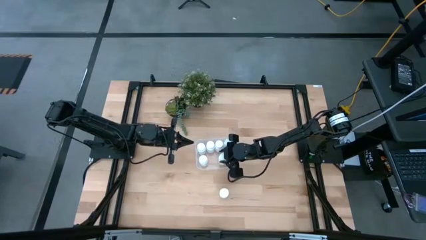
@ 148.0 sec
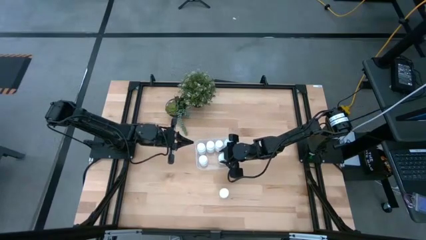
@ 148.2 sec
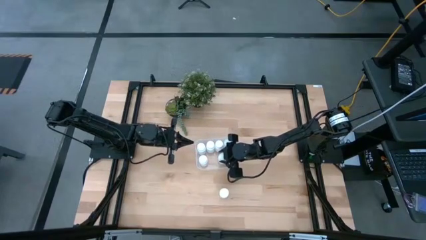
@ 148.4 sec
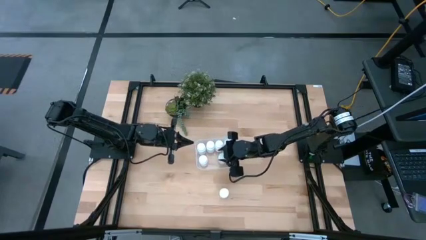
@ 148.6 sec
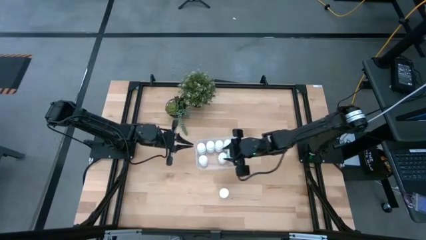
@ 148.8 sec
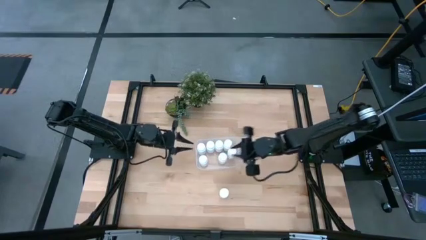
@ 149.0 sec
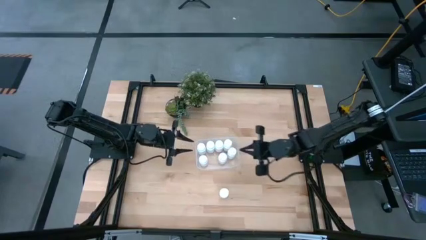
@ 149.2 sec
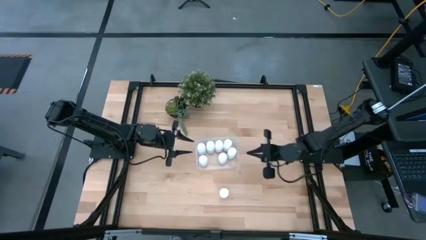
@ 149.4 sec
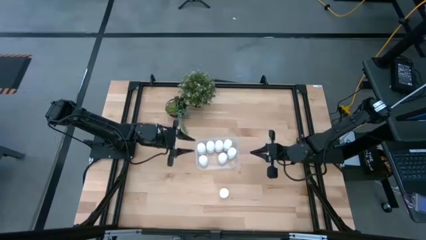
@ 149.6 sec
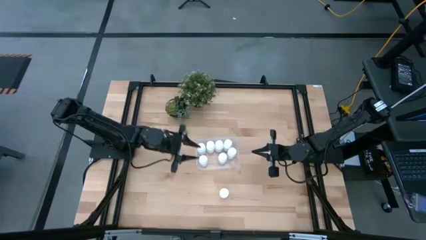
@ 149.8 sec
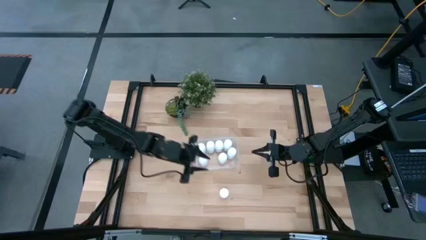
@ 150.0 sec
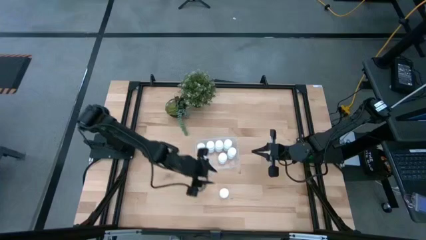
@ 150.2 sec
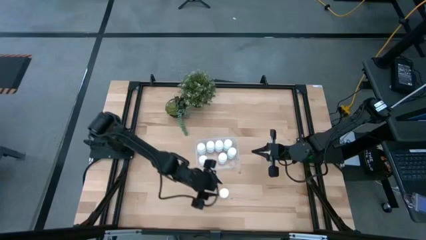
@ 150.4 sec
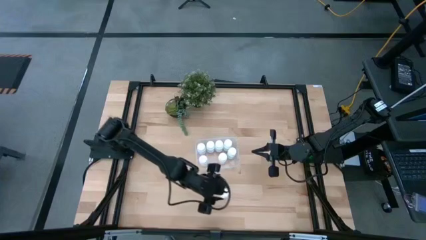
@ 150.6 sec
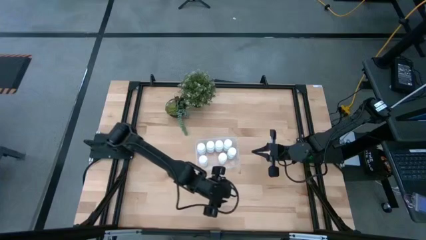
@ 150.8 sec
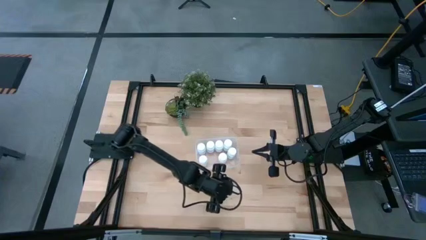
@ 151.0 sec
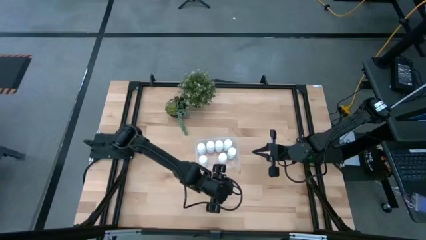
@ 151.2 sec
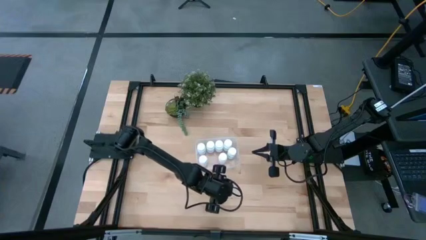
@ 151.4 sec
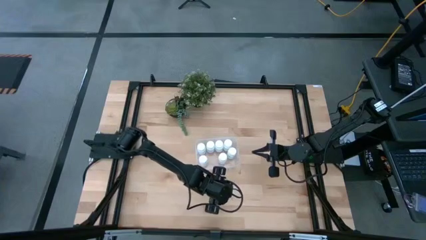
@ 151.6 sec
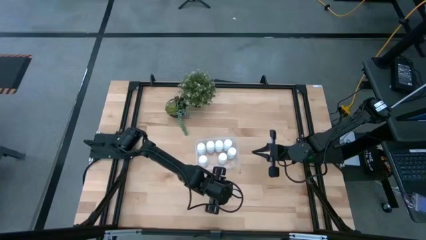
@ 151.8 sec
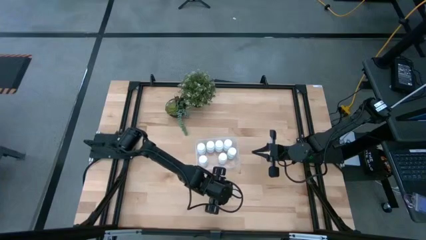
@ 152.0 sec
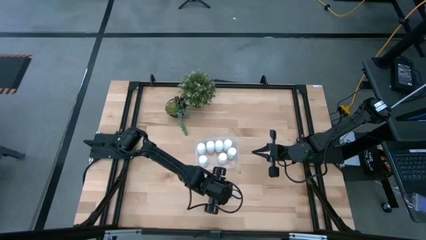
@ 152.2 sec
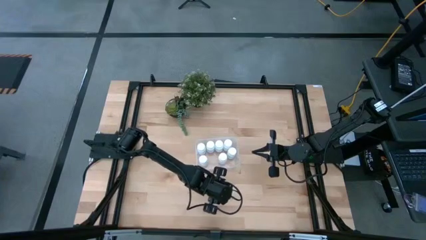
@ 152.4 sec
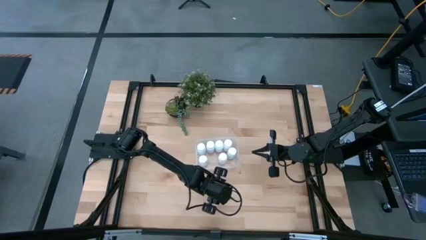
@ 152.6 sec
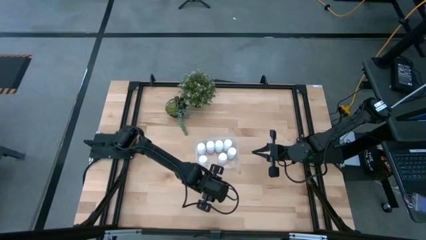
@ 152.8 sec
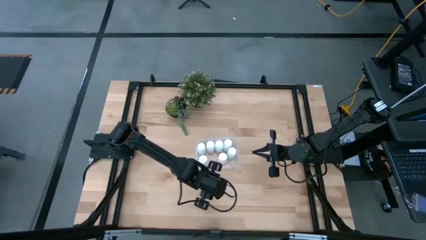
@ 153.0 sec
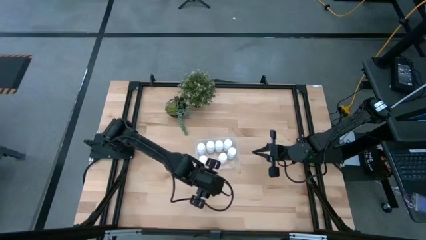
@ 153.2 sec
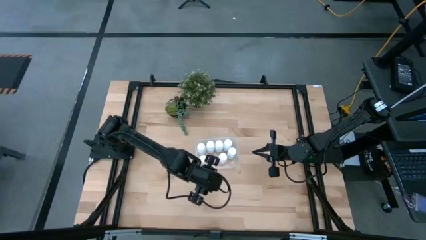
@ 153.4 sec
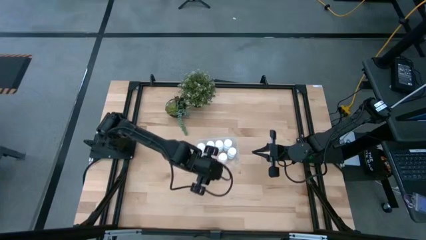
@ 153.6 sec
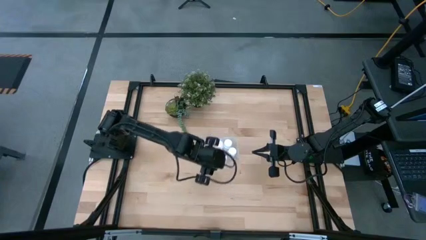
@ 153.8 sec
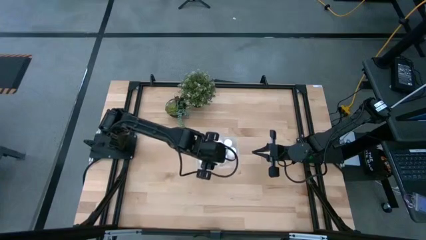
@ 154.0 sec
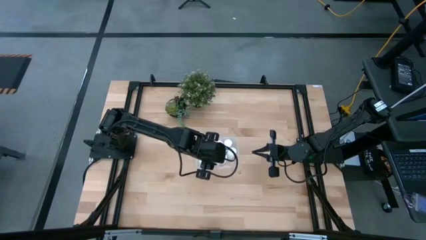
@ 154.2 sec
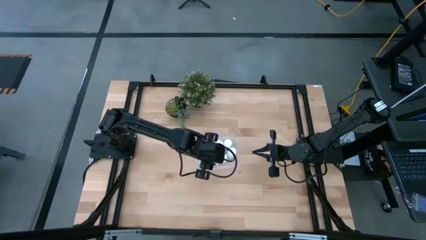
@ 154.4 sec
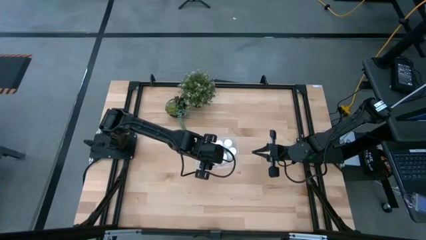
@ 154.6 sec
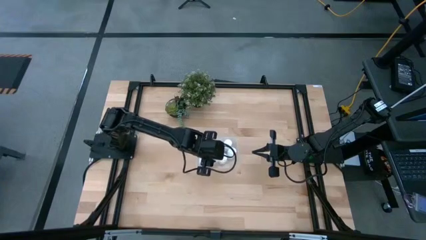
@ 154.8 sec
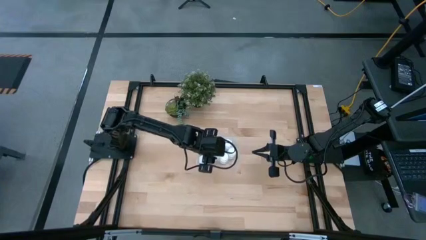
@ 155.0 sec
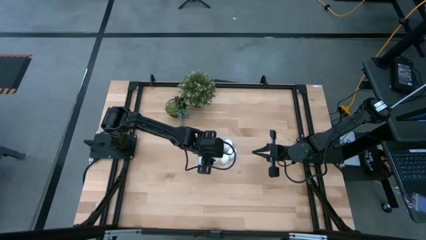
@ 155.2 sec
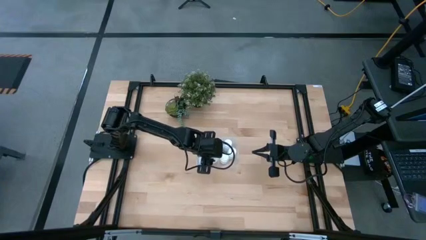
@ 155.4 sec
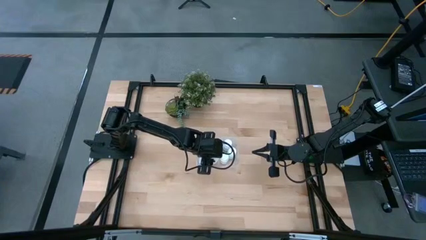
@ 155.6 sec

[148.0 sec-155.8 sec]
Task: Pick and place pill bottles into a basket
Put the pill bottle into the bin

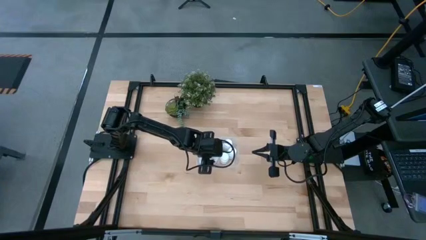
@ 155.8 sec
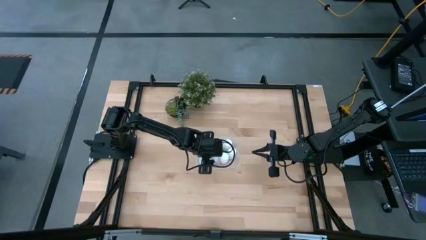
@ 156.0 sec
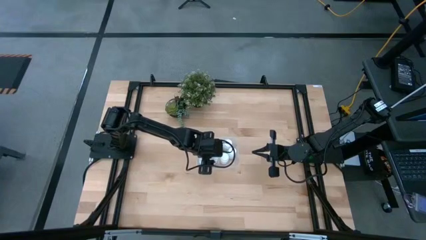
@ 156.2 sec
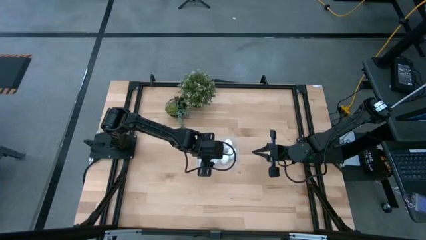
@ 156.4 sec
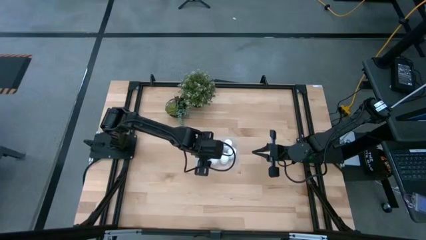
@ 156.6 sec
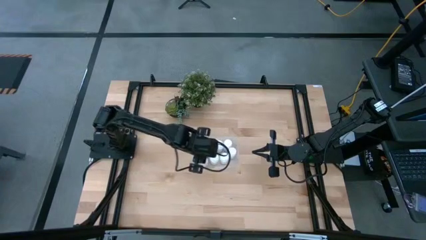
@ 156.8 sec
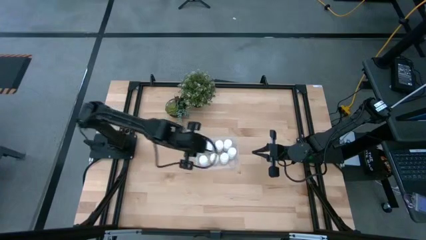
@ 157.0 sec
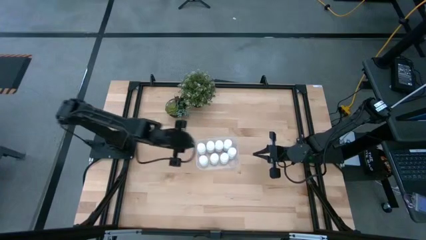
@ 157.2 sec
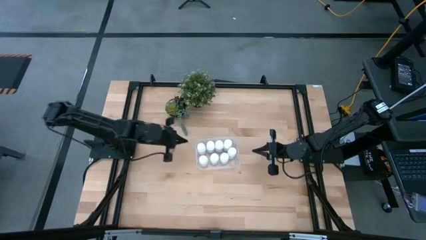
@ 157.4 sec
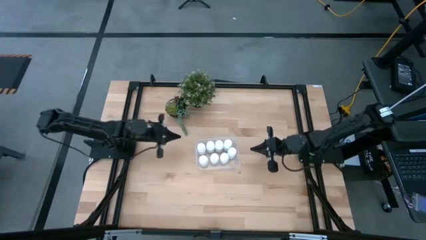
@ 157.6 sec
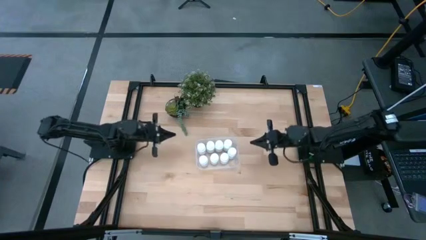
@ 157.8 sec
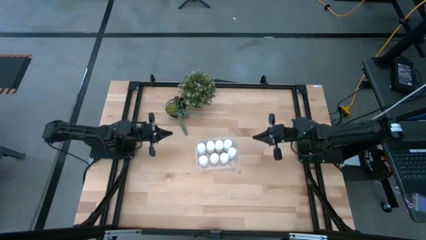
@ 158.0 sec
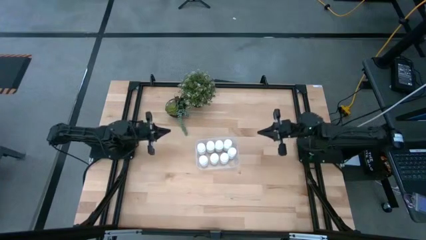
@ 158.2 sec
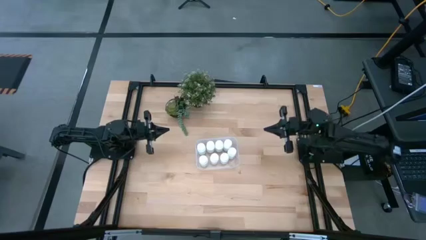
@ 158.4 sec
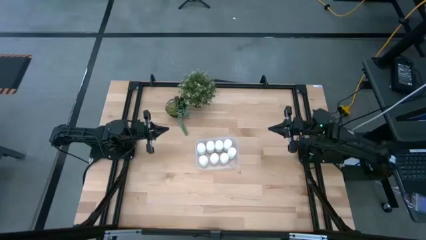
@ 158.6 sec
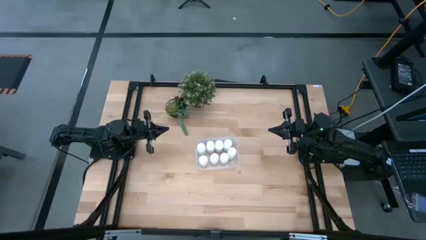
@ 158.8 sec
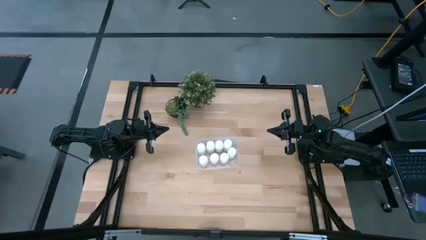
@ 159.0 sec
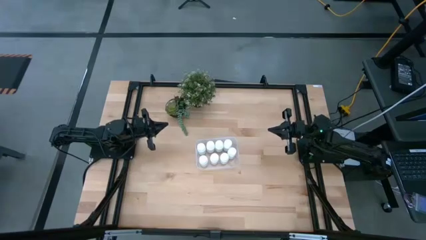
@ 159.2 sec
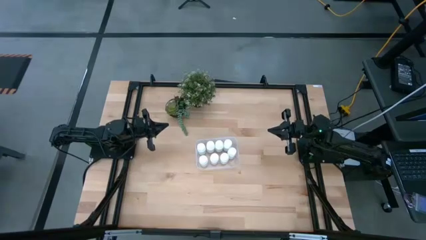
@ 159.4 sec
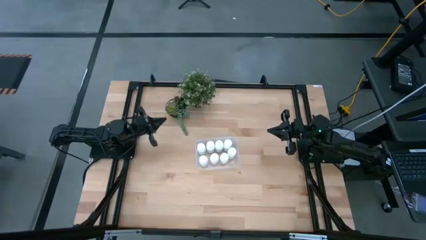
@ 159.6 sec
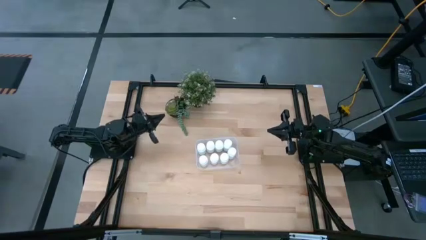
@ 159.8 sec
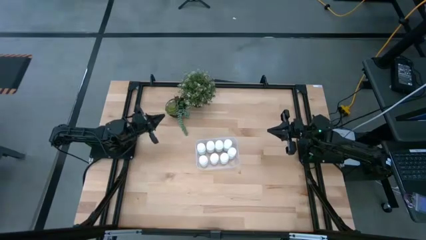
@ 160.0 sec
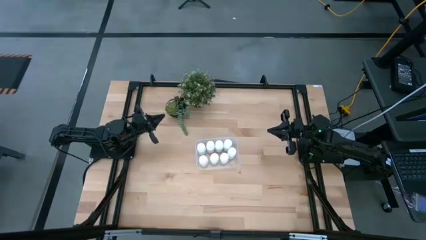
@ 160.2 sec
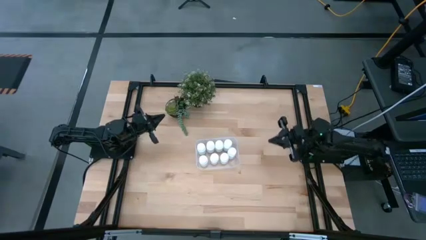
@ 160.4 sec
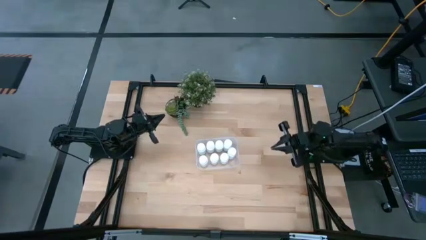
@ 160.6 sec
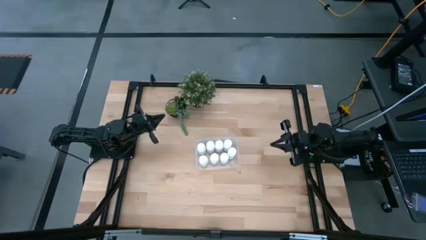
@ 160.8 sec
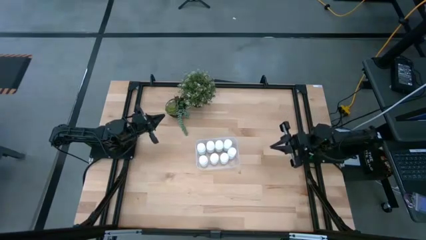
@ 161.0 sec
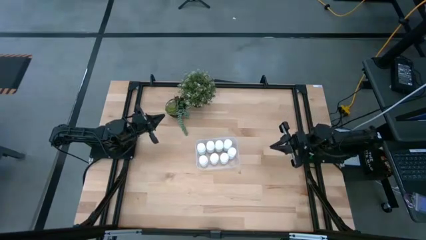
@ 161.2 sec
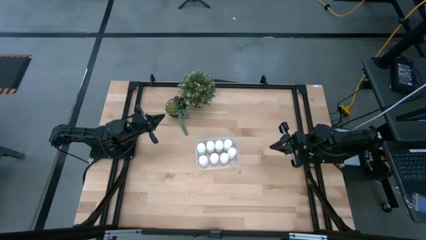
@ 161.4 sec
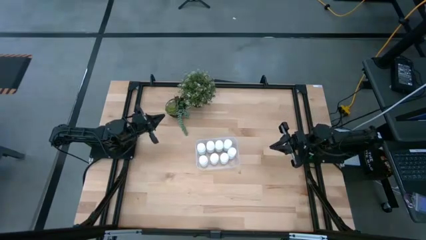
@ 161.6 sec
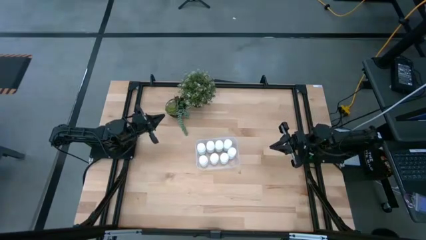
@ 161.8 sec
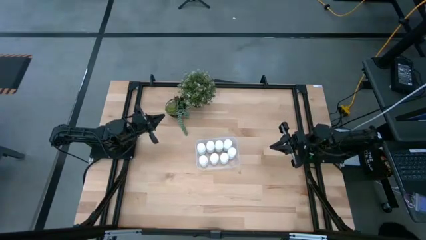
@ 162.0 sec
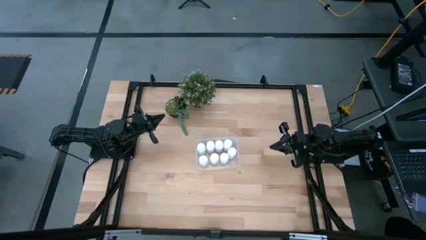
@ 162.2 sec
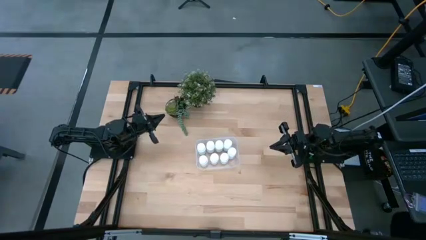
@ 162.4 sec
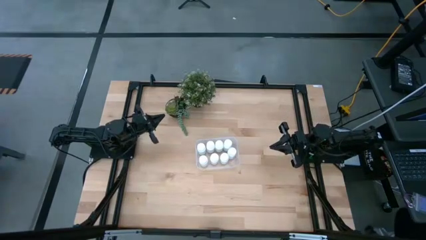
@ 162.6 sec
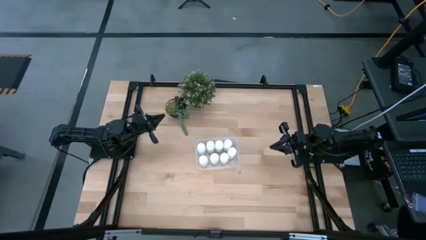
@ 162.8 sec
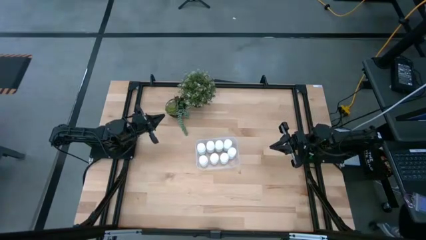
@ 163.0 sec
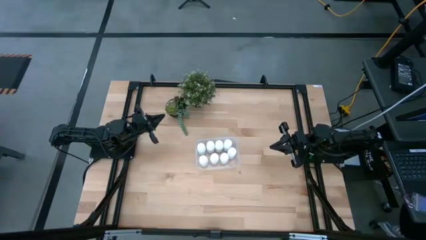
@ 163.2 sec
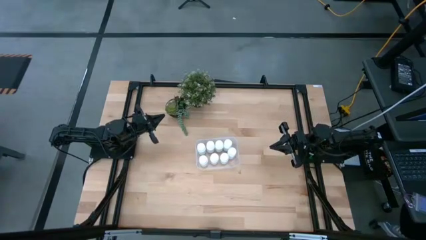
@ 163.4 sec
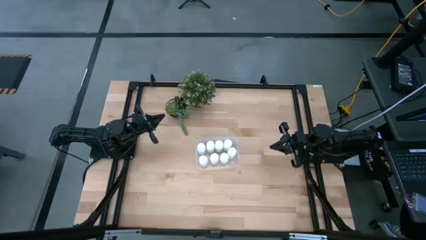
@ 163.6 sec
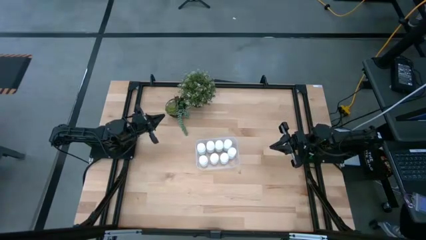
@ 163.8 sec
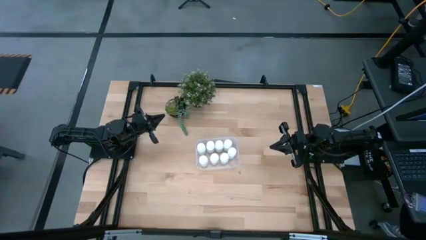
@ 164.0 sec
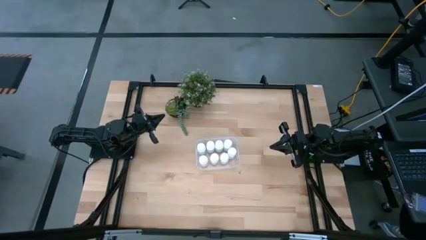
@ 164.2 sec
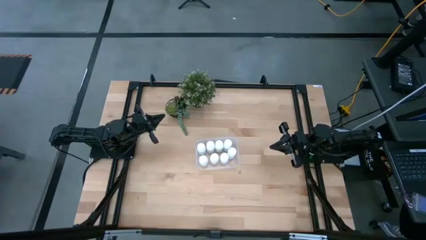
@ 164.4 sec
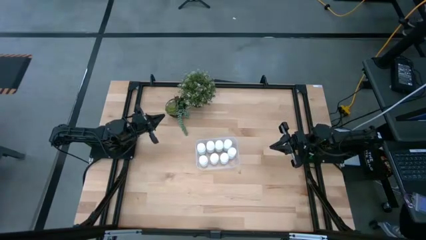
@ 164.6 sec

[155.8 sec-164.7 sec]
Return to Home Position
